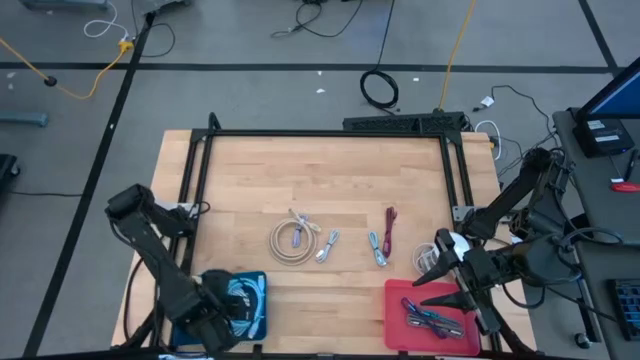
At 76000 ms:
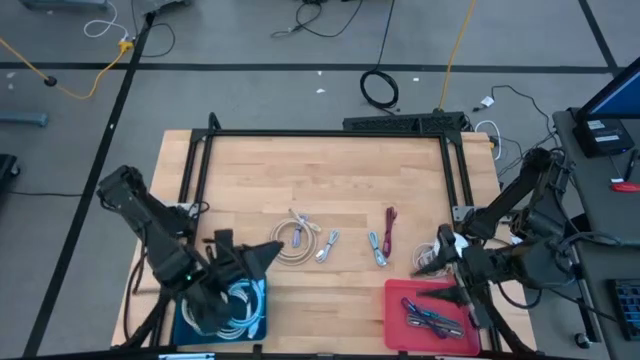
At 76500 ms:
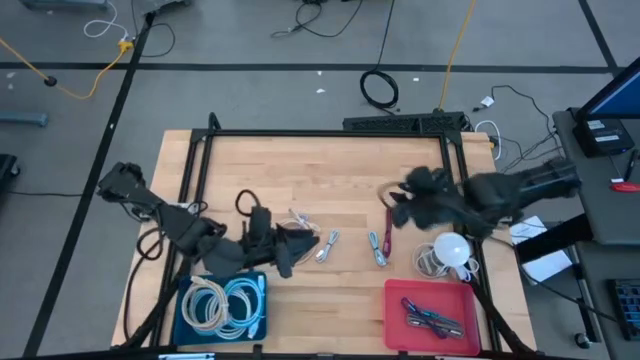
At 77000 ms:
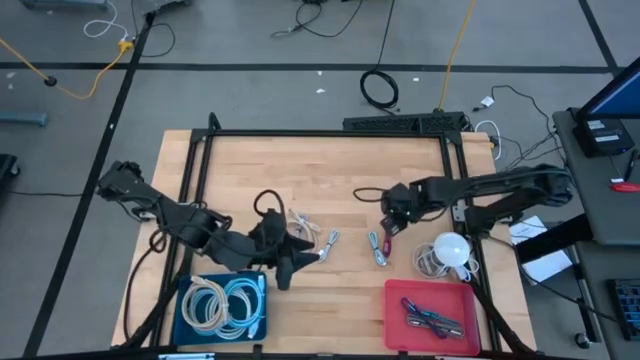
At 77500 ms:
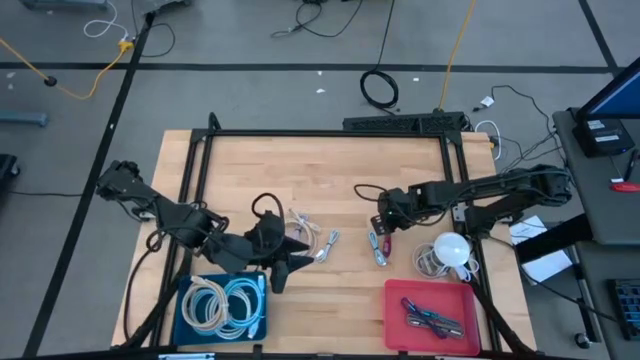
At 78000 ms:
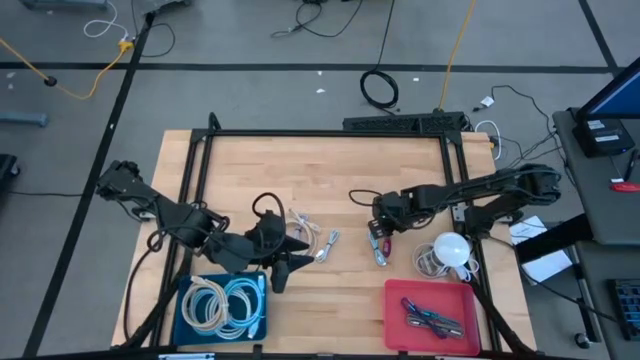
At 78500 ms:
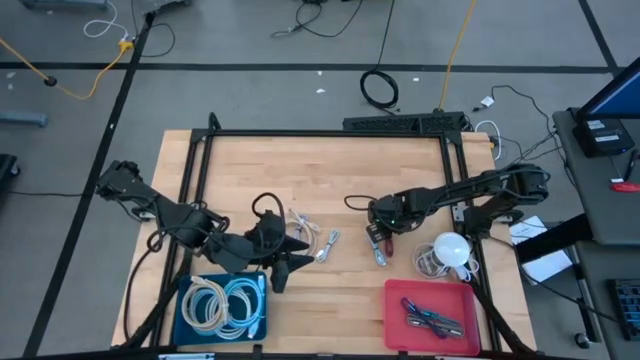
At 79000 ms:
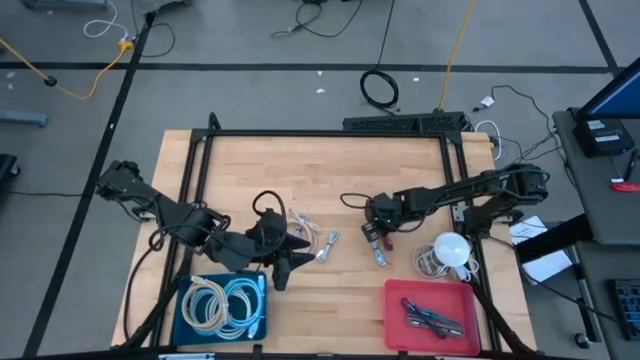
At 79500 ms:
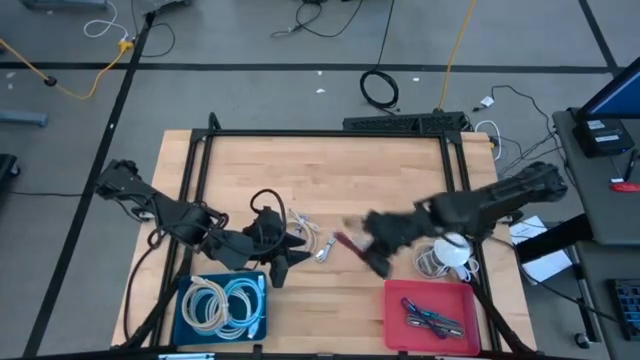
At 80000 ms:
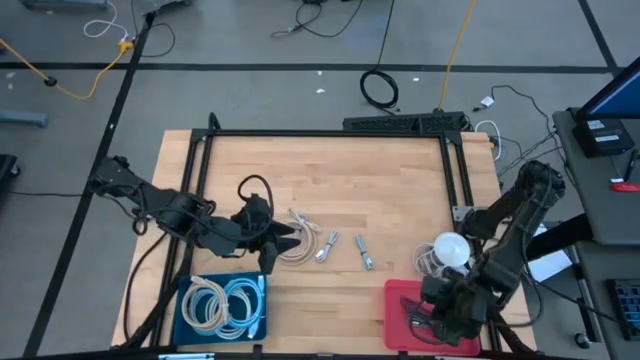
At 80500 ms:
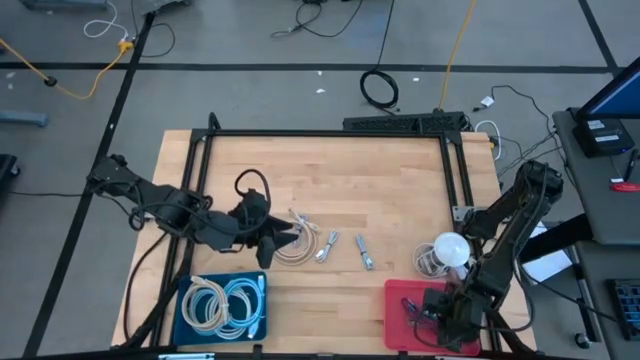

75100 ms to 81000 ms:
Task: Pick & Place USB Port
Put the pink and black charger cable into the pink bin

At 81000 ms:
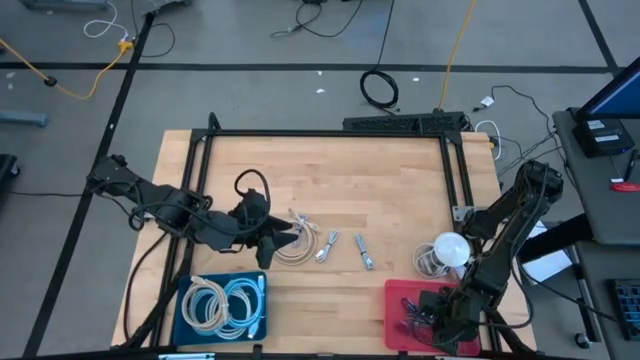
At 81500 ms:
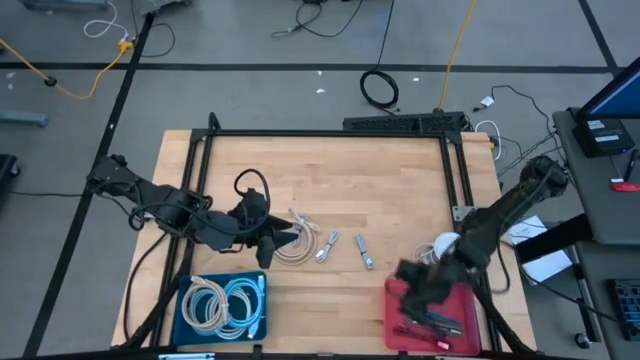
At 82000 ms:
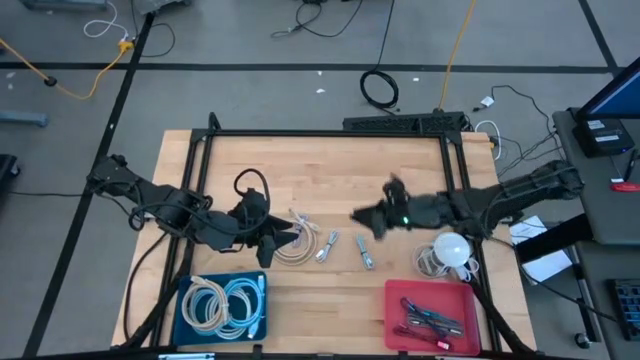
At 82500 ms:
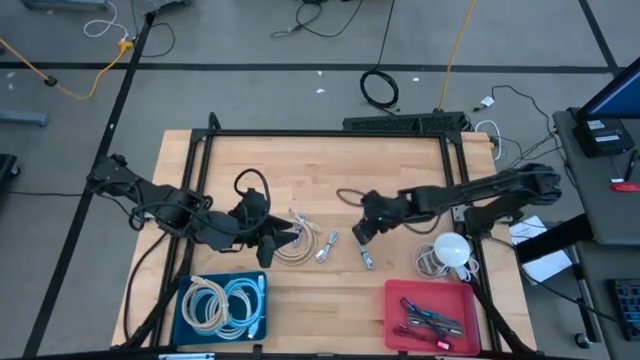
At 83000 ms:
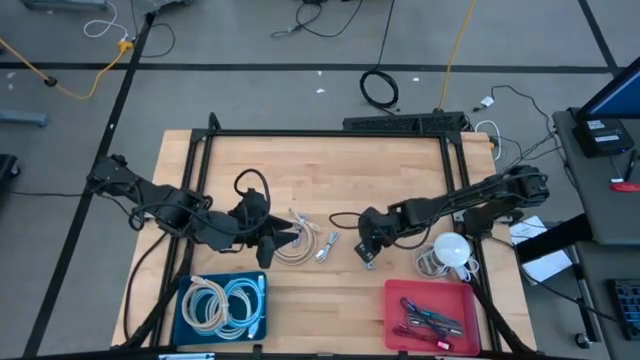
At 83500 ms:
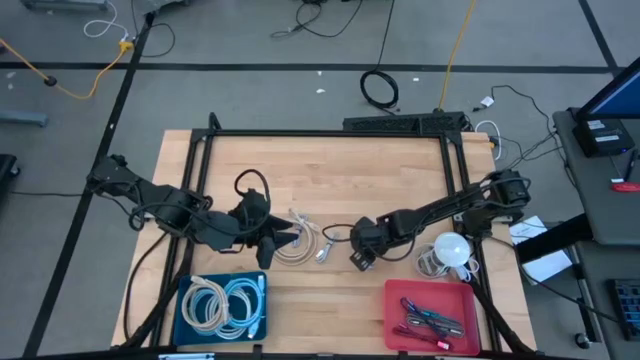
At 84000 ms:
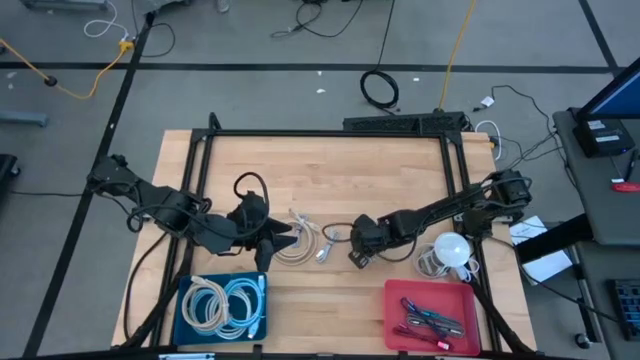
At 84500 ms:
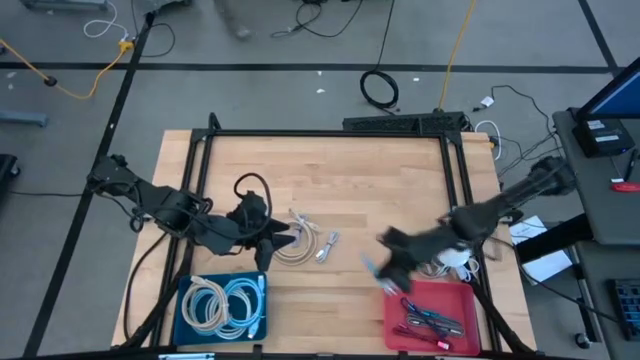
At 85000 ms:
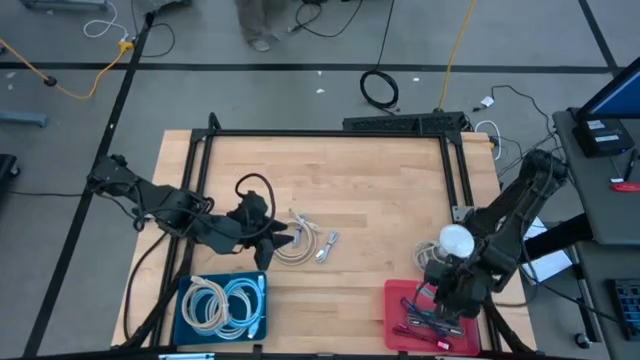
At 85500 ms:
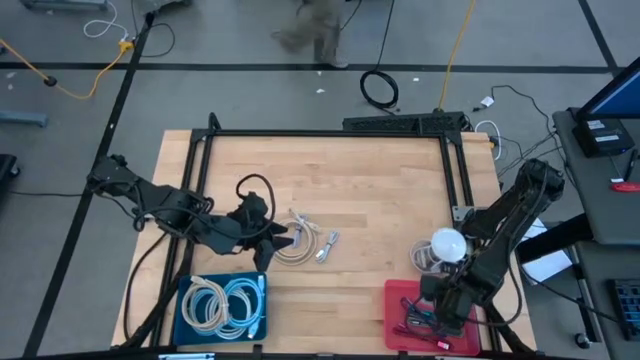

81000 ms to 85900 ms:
Put the light blue charger cable into the pink bin

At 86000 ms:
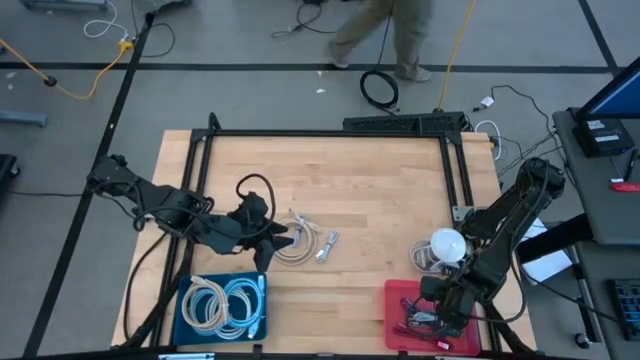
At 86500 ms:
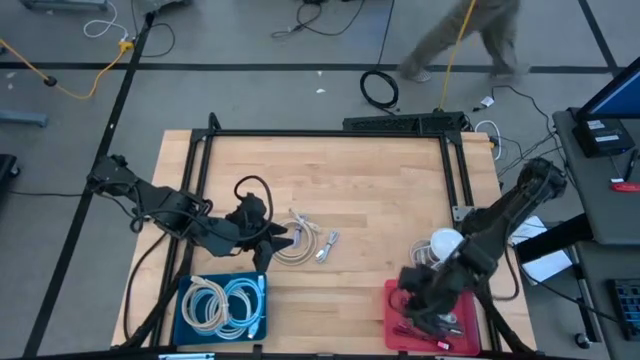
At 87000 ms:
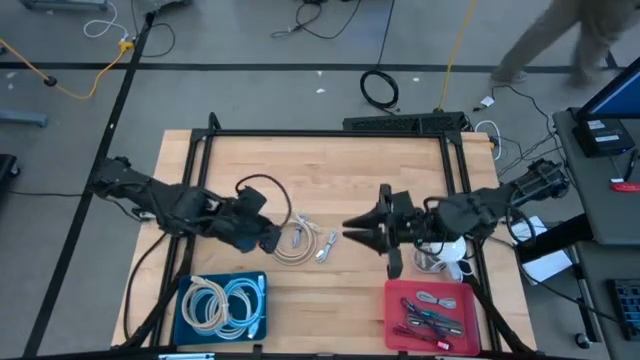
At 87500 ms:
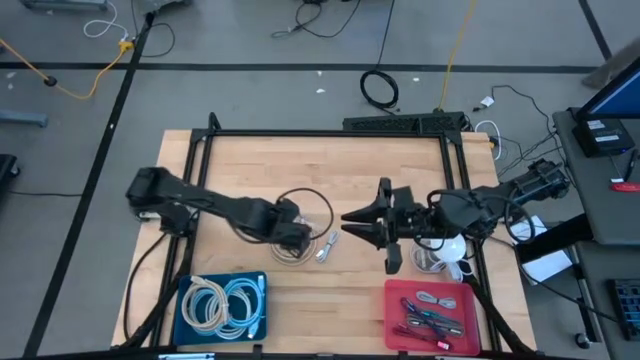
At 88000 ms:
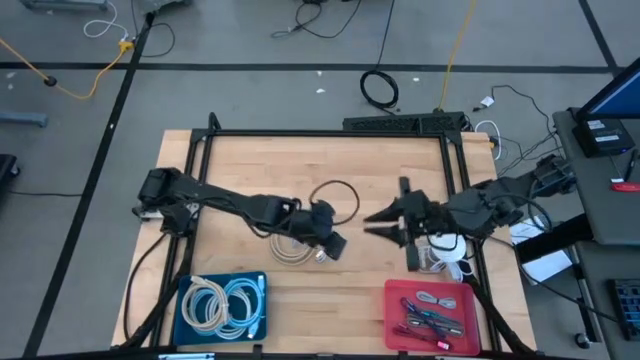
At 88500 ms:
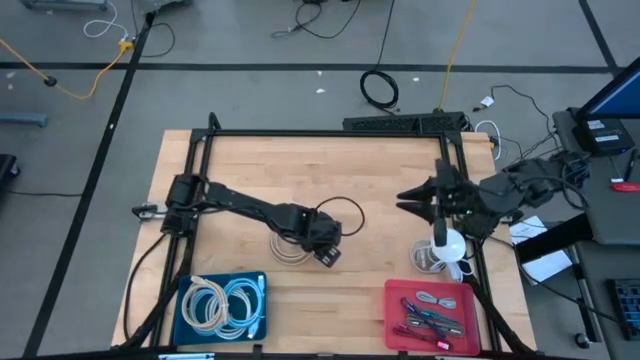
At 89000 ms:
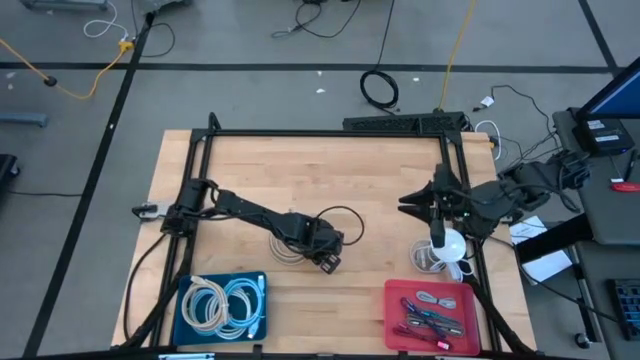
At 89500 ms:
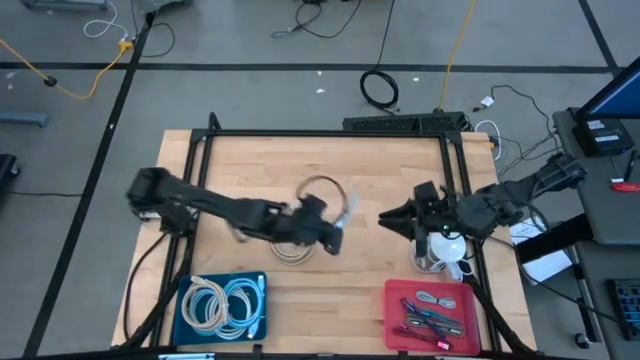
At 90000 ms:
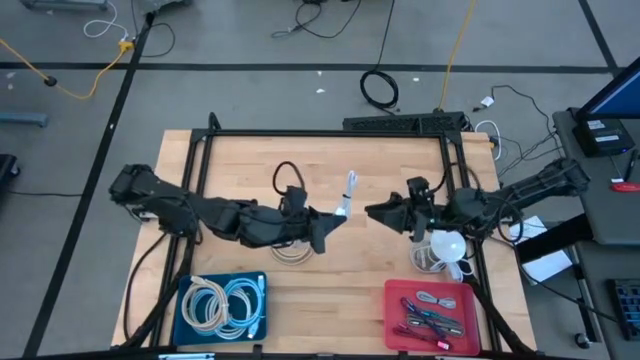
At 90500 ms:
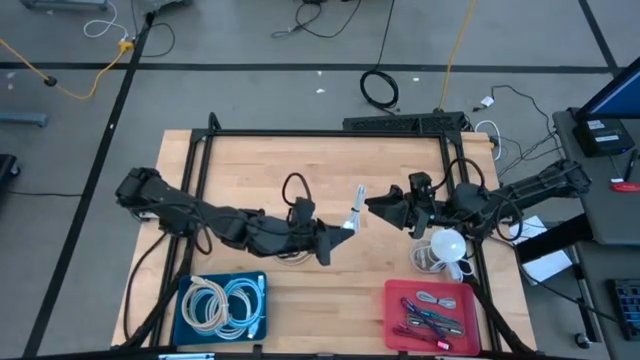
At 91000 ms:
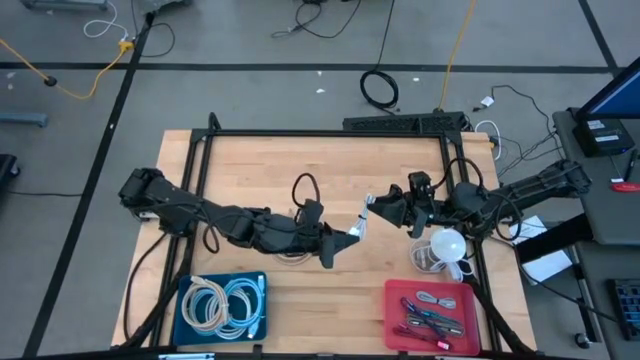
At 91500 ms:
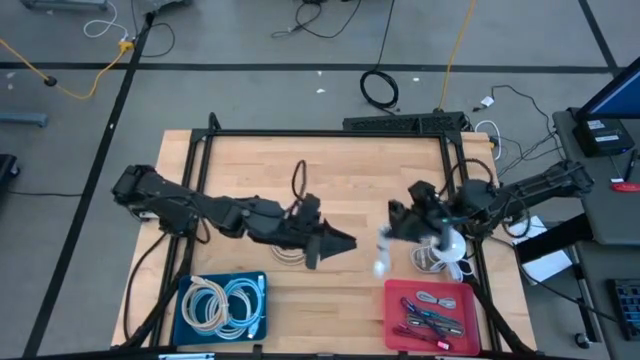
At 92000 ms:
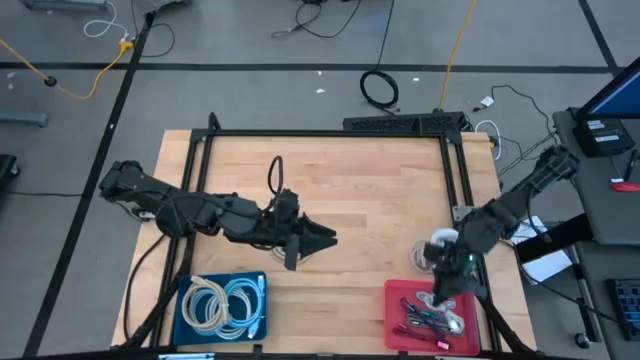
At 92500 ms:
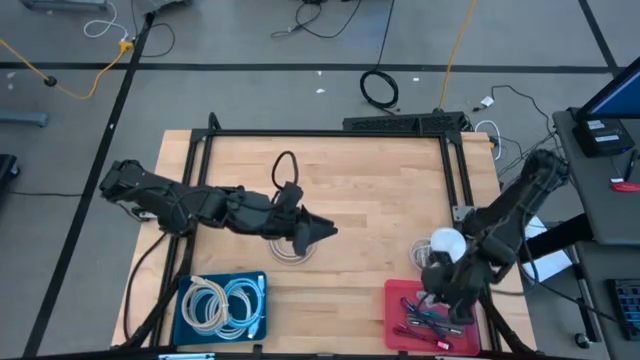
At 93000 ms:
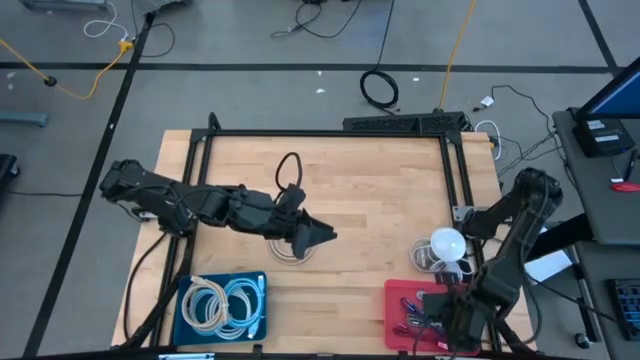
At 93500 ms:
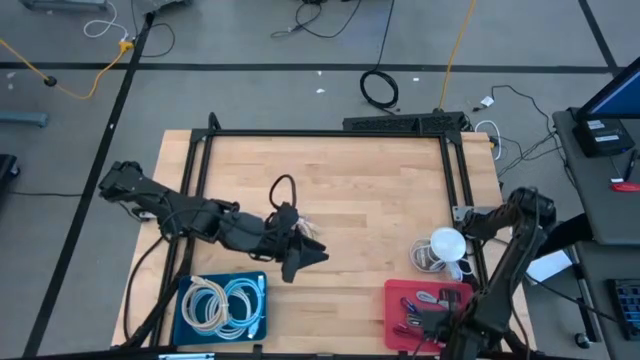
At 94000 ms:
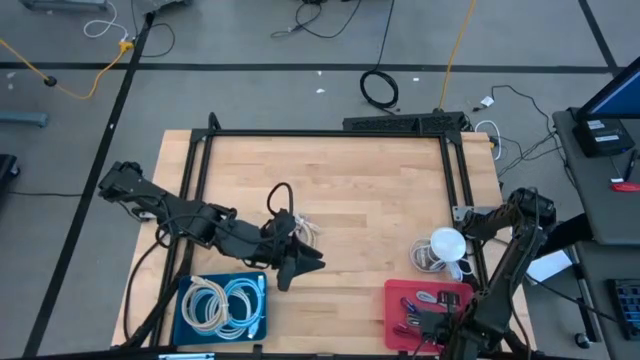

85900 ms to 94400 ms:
Put the white charger cable into the pink bin
